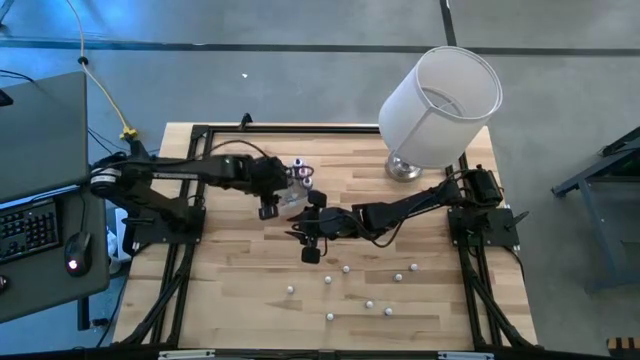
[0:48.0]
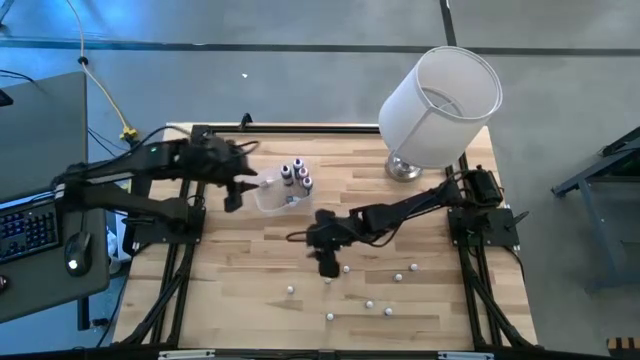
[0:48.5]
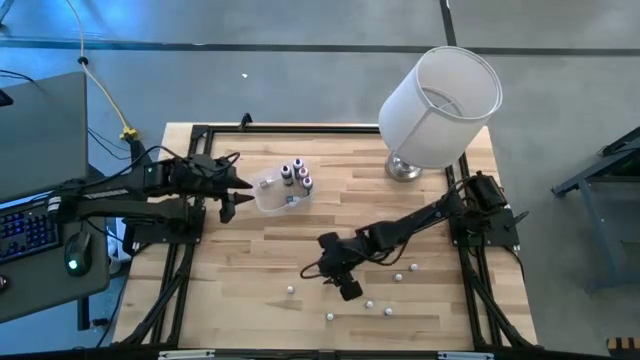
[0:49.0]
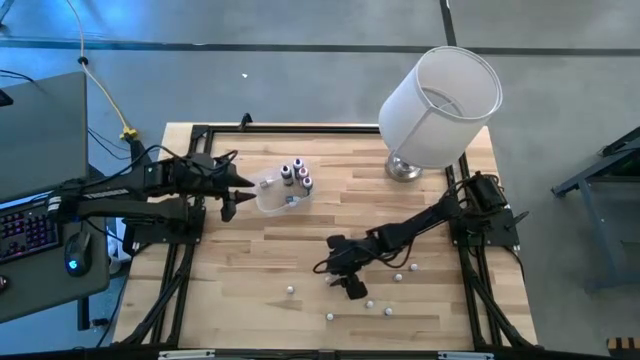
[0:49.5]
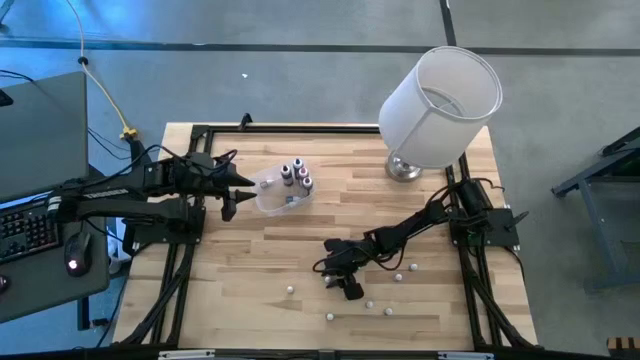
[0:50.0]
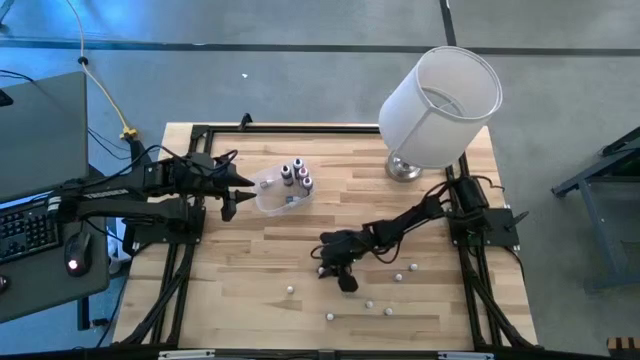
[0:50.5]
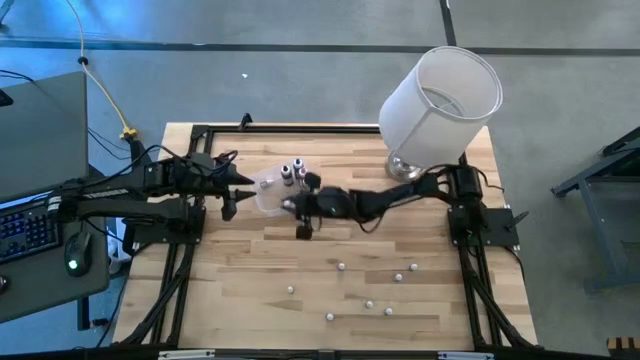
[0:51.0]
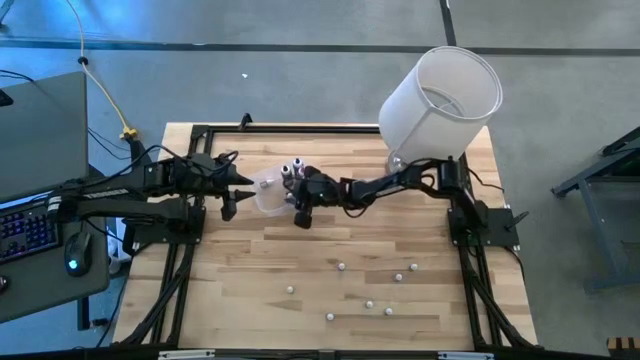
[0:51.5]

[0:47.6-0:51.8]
Task: Pick & Place food coloring
Put the small violet food coloring bottle into the transparent bin

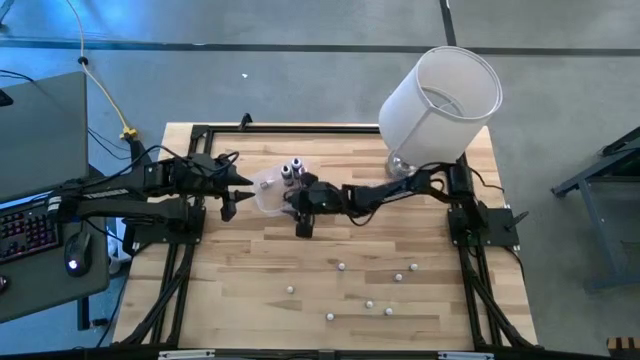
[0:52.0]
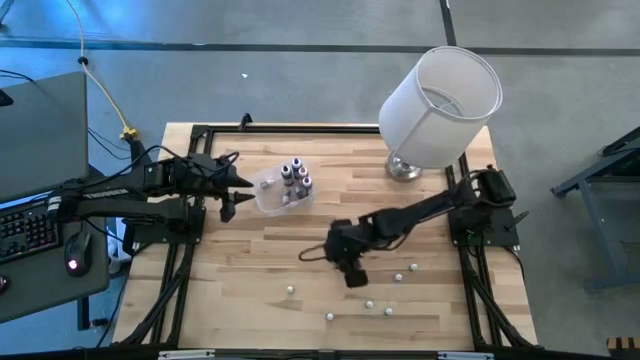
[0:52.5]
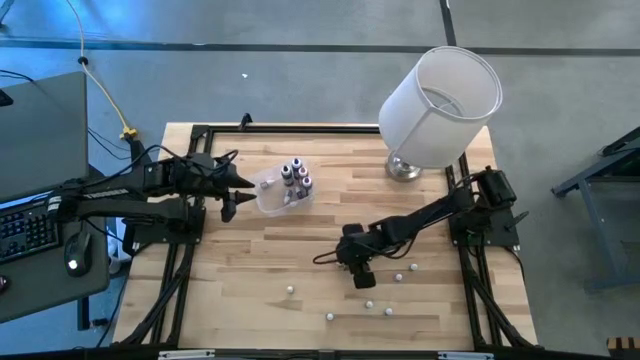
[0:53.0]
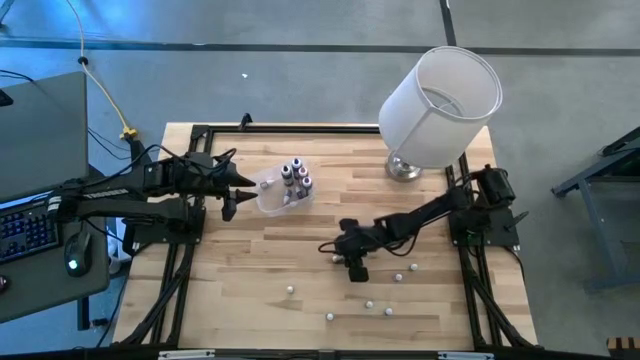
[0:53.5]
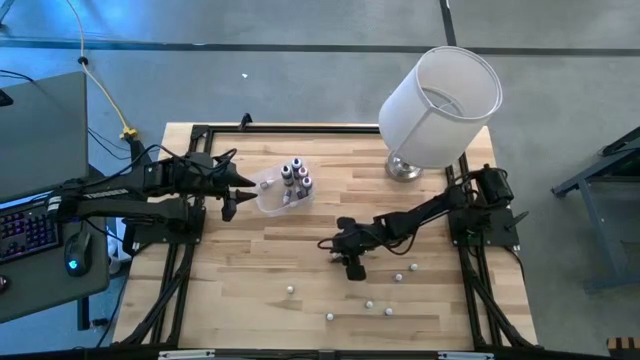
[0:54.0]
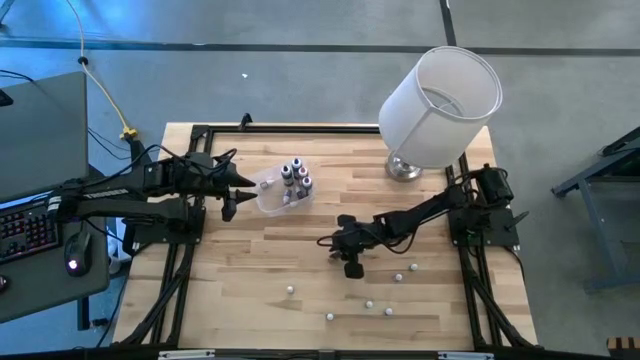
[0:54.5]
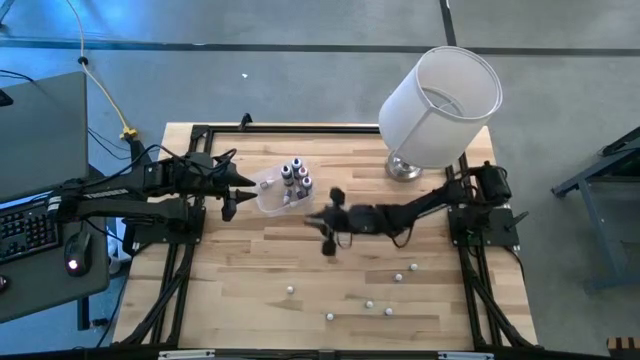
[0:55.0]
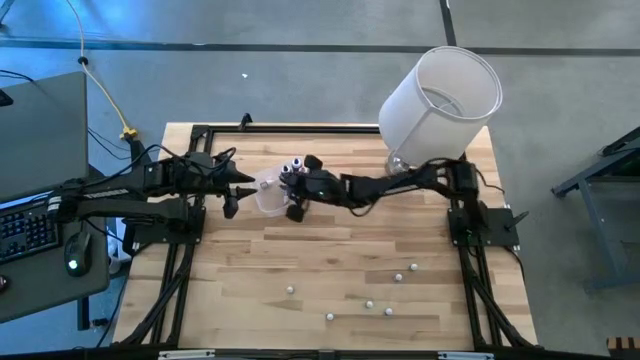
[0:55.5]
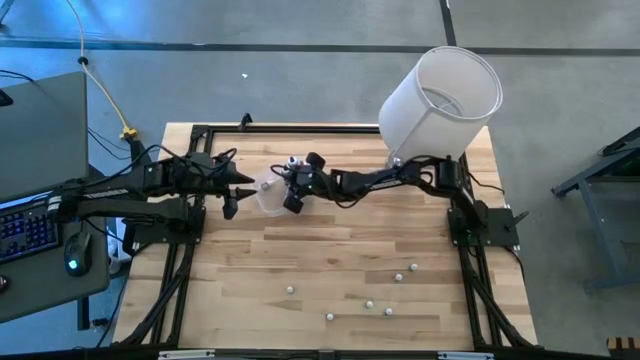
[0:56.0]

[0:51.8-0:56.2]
Put the small brown food coloring bottle into the transparent bin

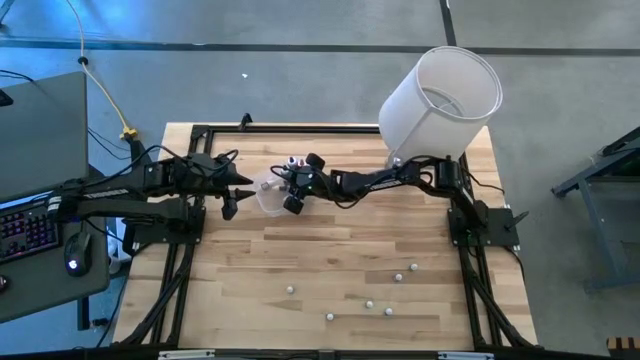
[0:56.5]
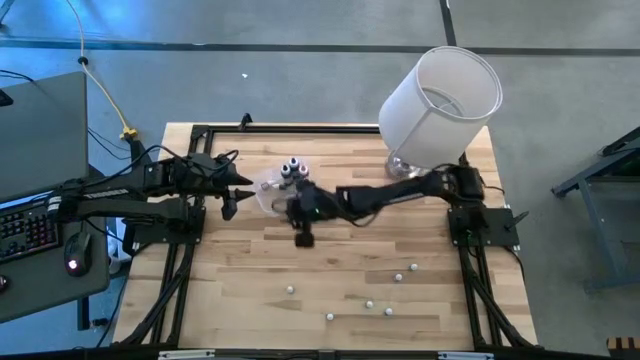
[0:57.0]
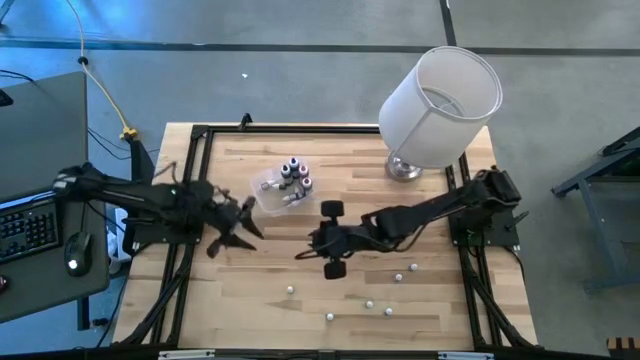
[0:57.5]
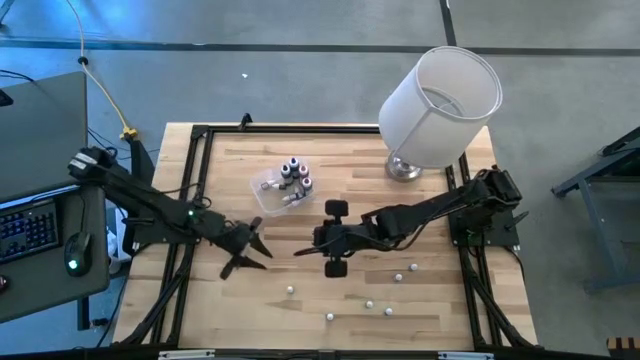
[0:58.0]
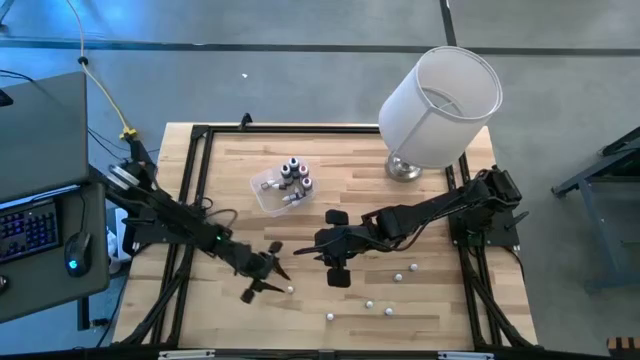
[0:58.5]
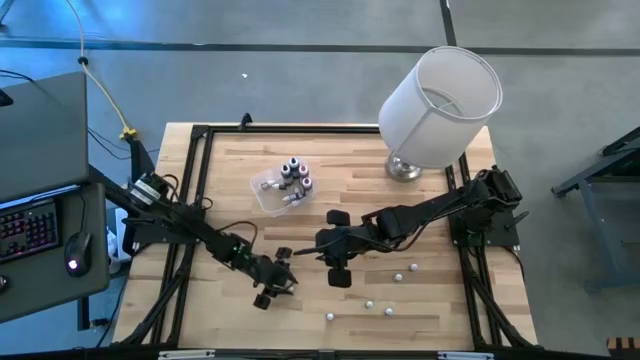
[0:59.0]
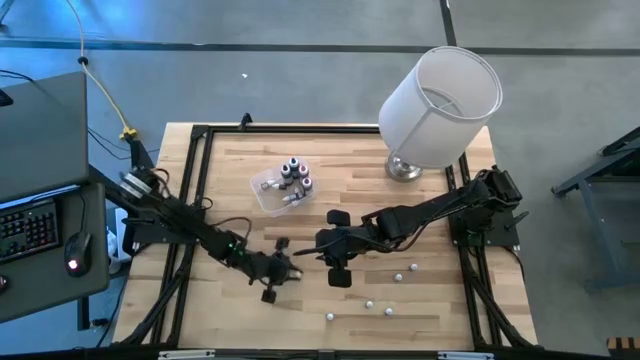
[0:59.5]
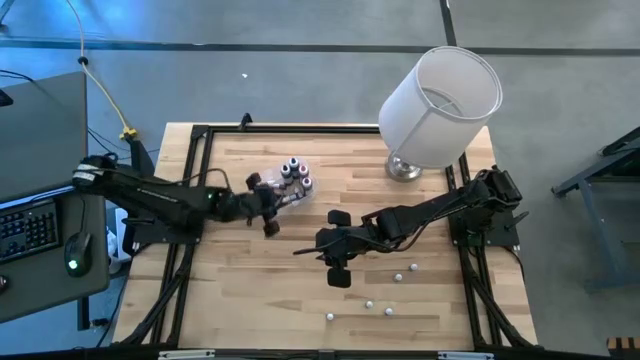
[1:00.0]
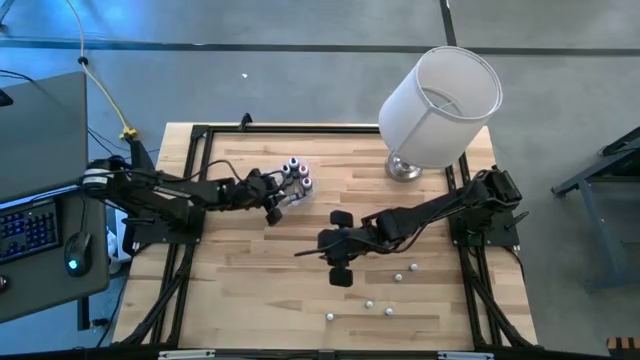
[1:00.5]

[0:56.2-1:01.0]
Put the small orange food coloring bottle into the transparent bin

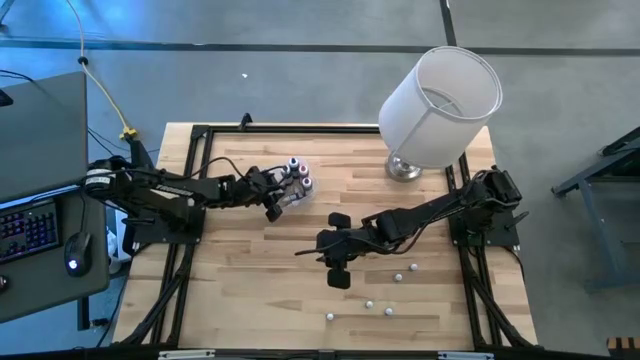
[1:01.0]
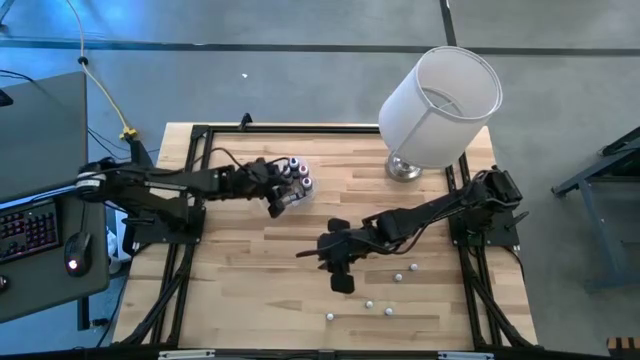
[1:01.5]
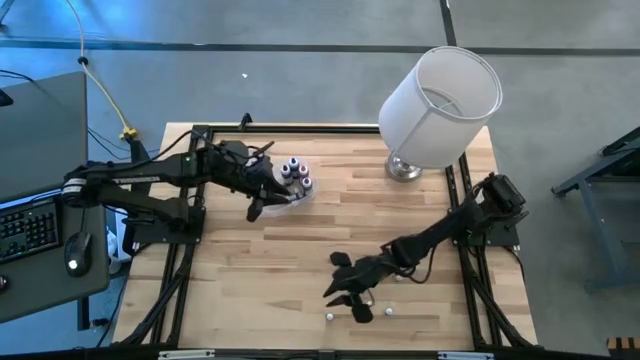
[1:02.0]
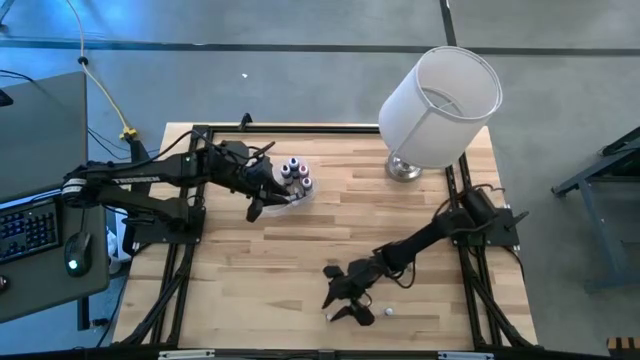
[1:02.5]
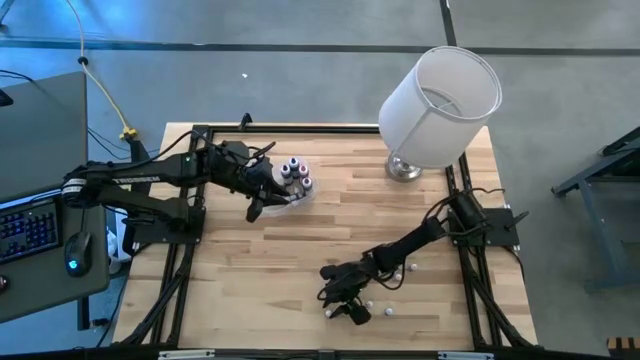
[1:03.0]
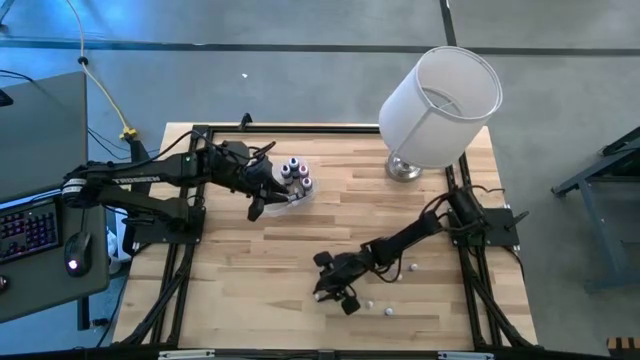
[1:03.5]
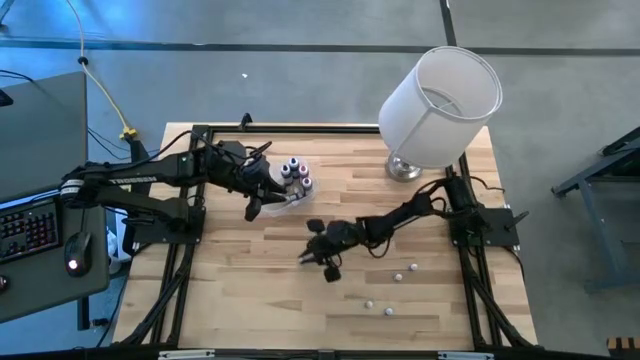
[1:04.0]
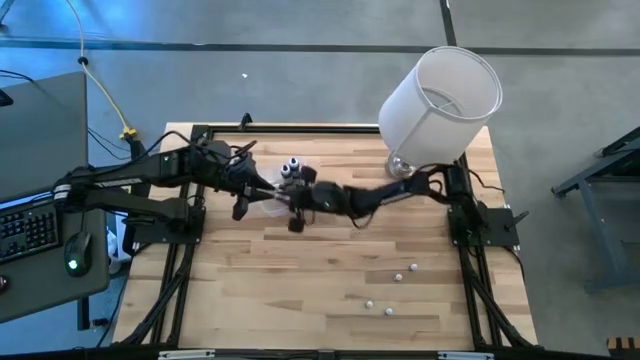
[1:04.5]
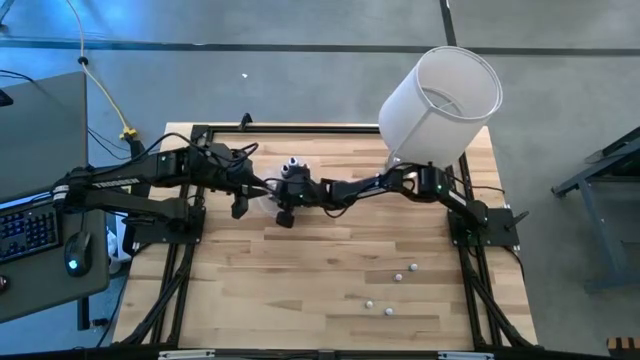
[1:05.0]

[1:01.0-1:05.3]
Put the small green food coloring bottle into the transparent bin

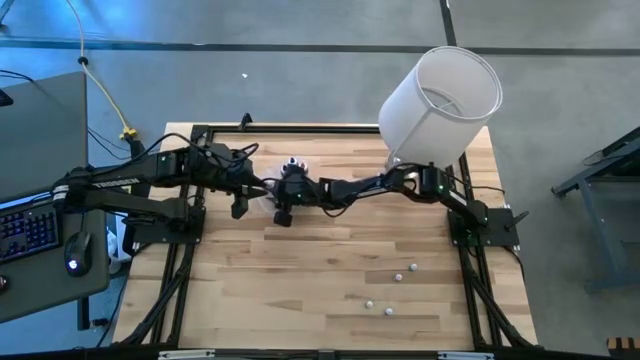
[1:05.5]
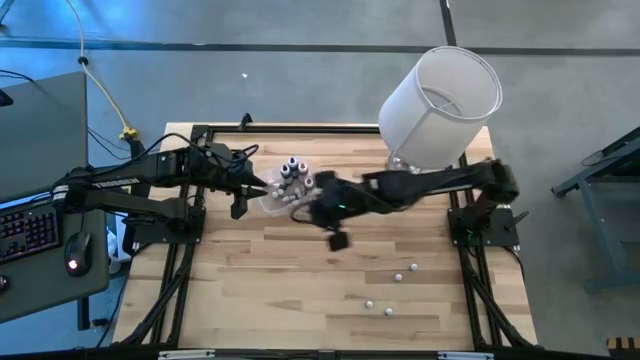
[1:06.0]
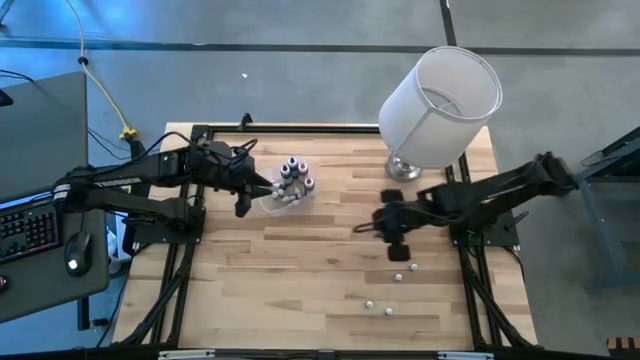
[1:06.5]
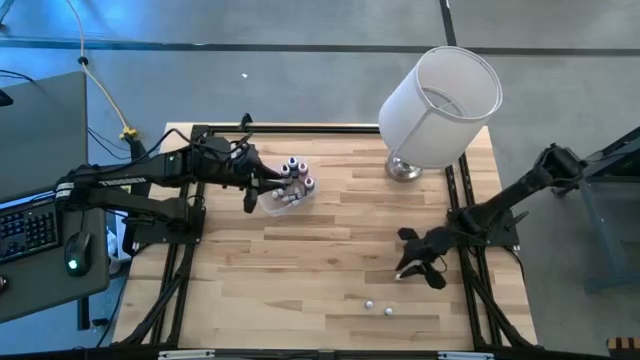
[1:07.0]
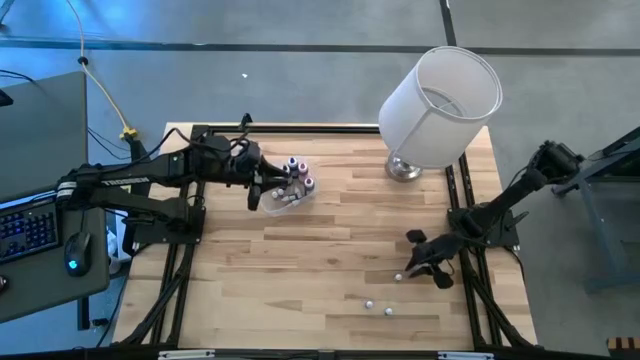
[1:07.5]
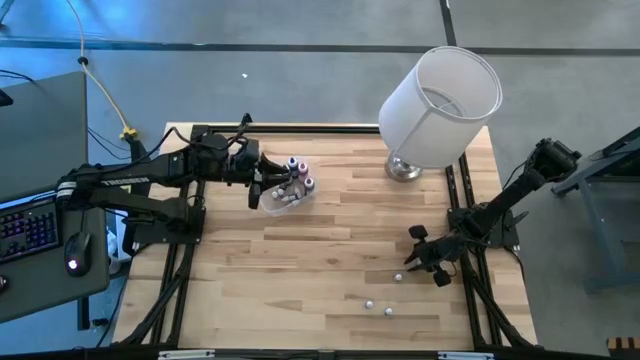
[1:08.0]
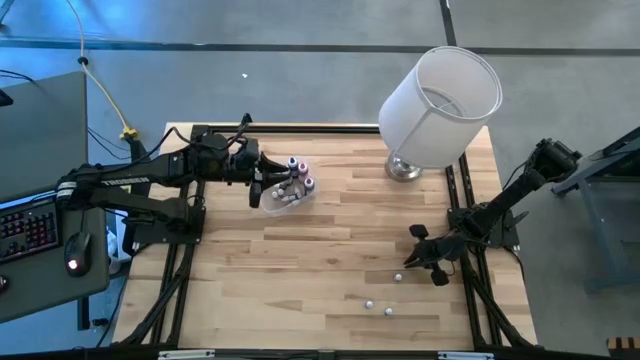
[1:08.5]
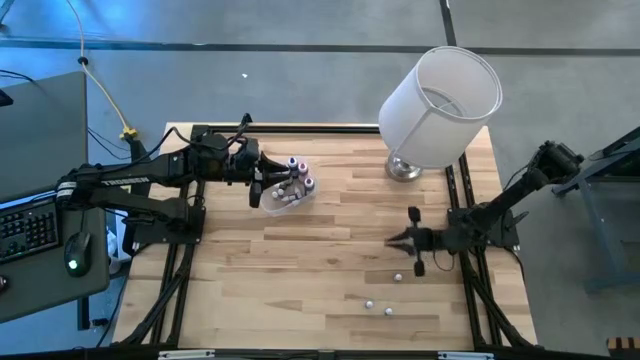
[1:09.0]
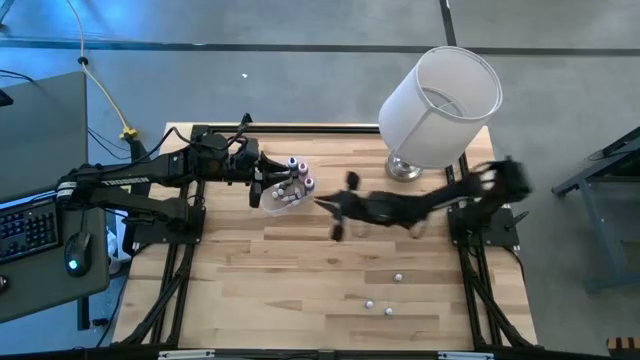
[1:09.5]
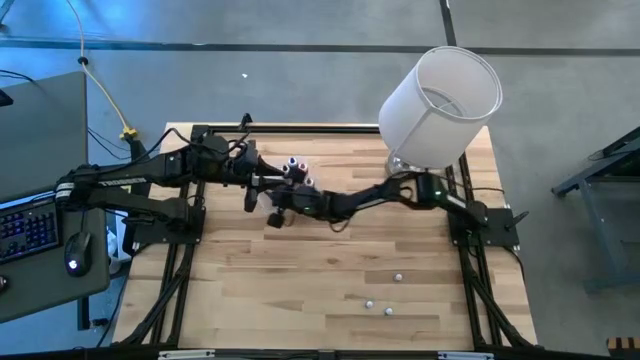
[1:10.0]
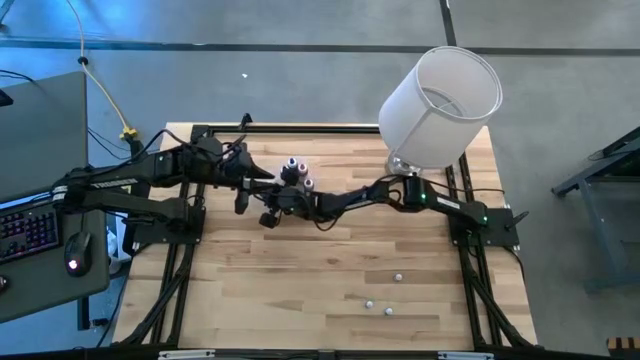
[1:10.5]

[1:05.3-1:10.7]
Put the small green food coloring bottle into the transparent bin
